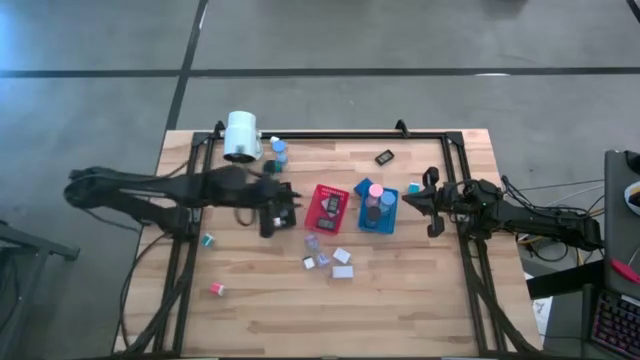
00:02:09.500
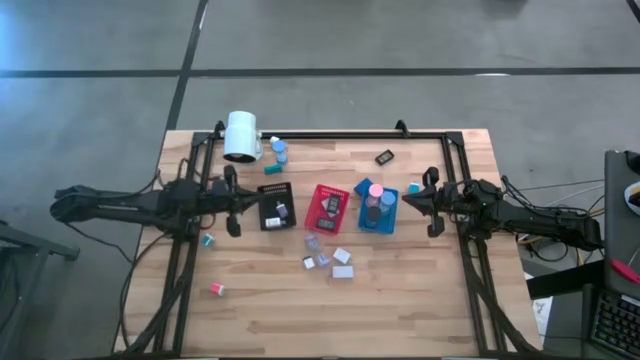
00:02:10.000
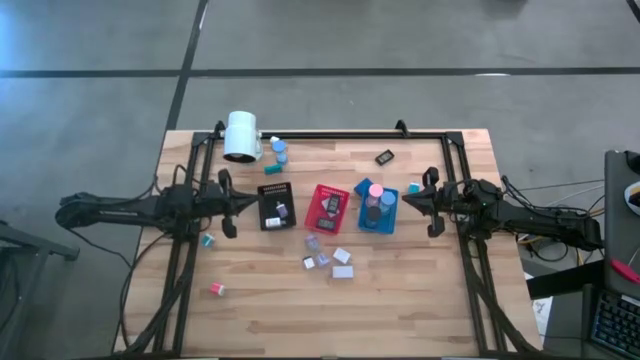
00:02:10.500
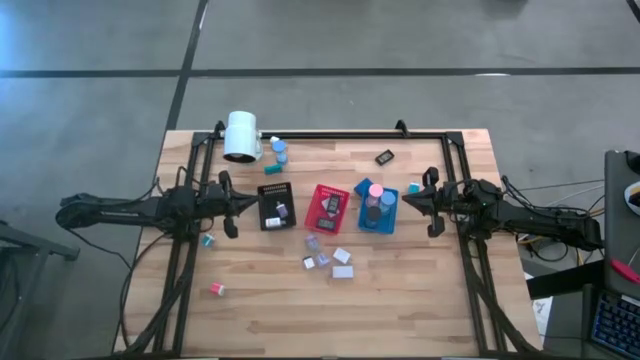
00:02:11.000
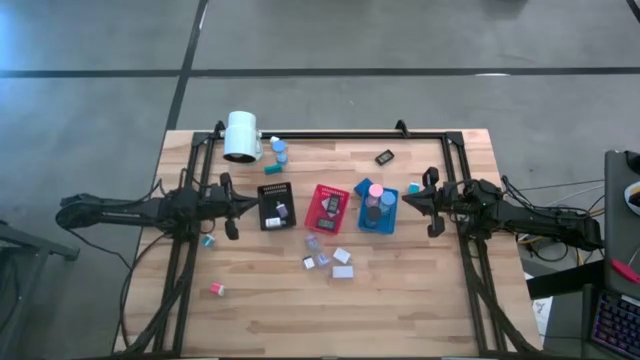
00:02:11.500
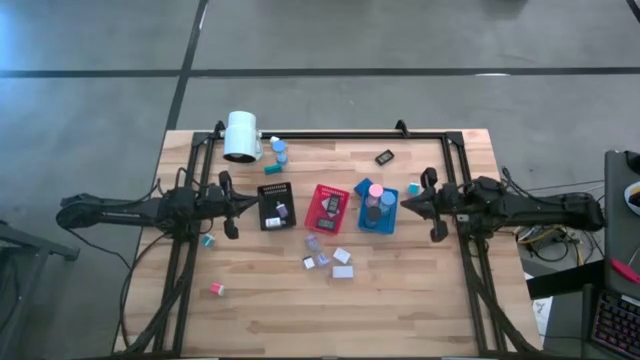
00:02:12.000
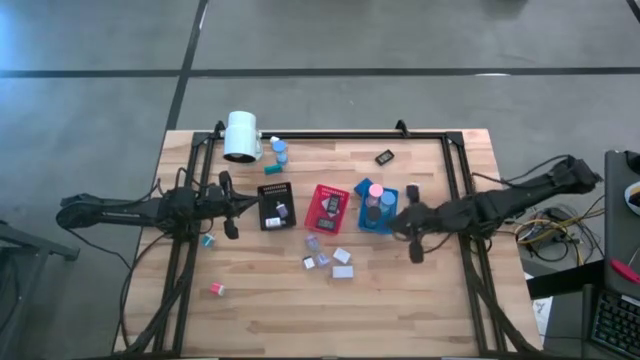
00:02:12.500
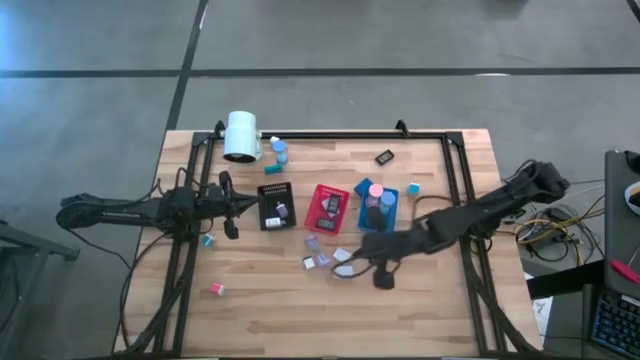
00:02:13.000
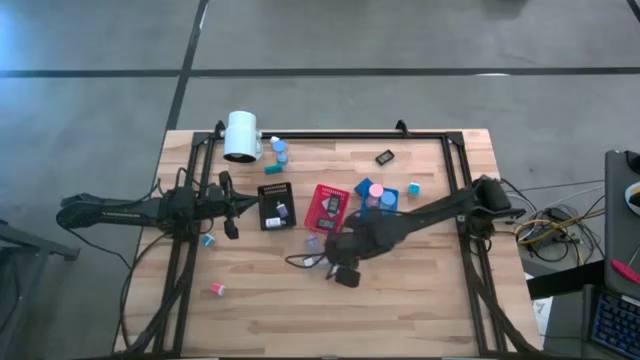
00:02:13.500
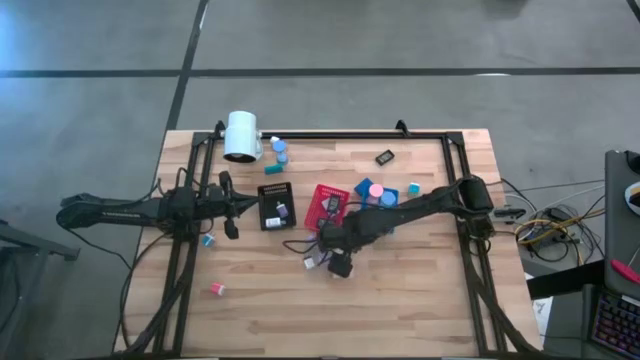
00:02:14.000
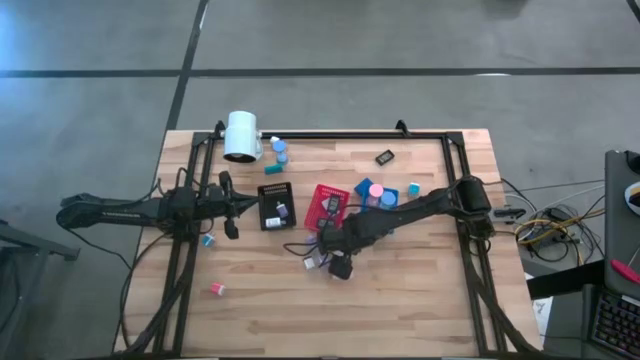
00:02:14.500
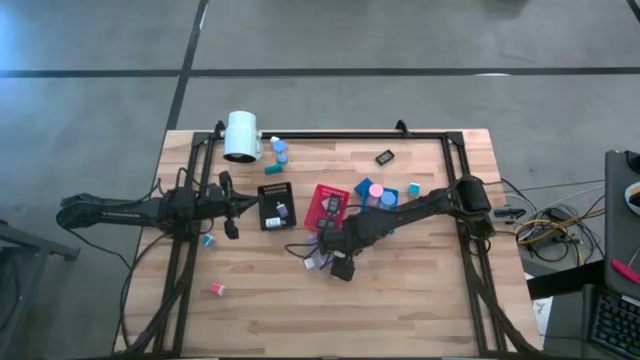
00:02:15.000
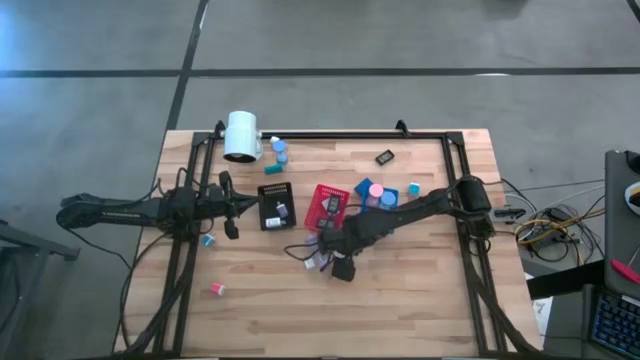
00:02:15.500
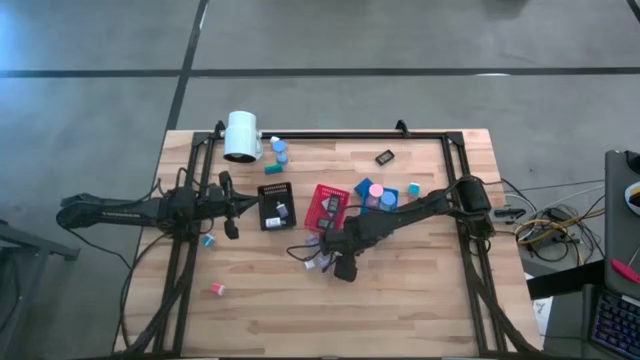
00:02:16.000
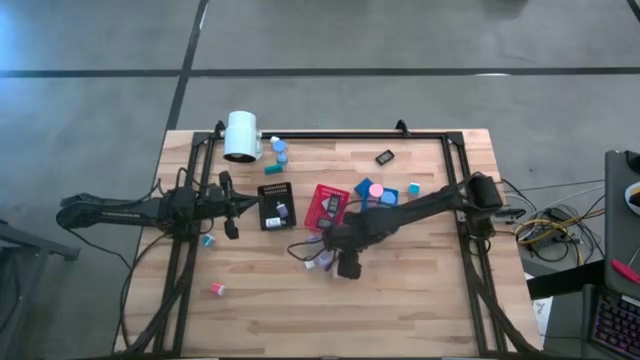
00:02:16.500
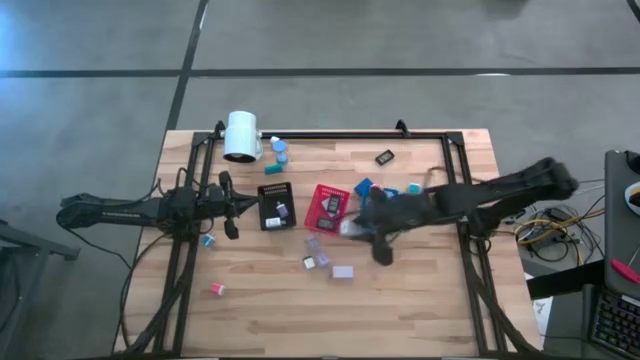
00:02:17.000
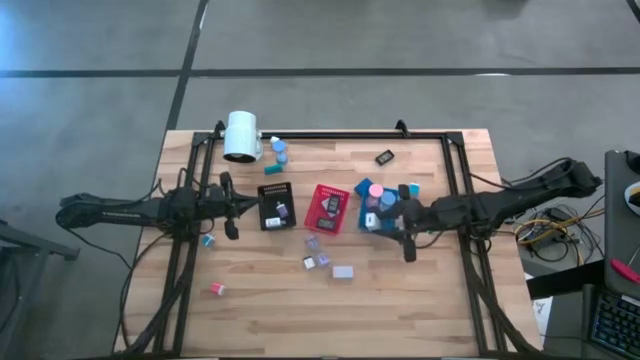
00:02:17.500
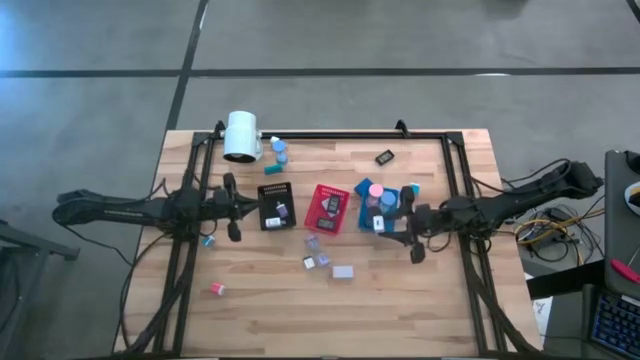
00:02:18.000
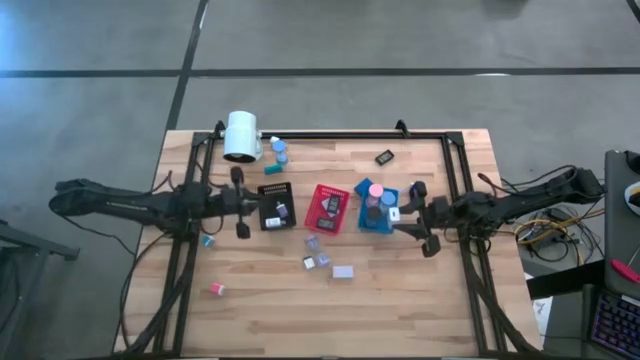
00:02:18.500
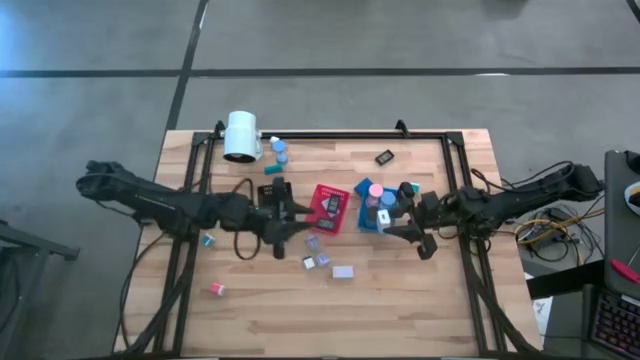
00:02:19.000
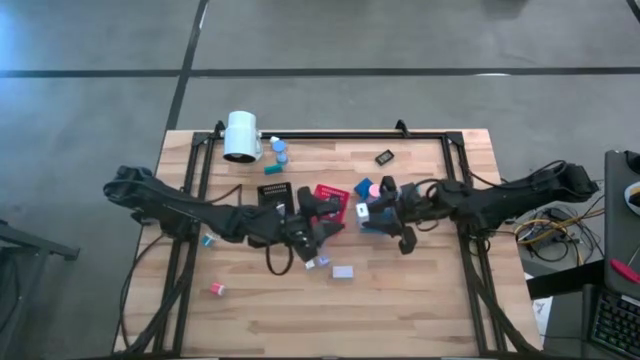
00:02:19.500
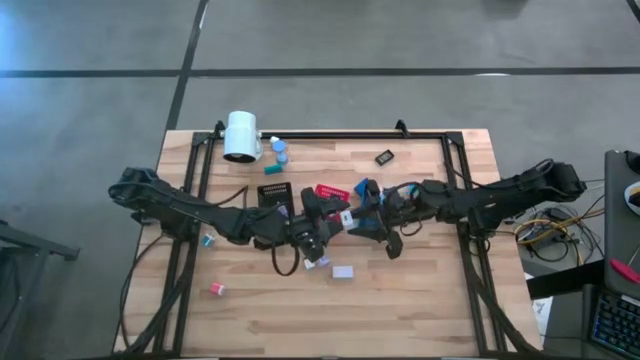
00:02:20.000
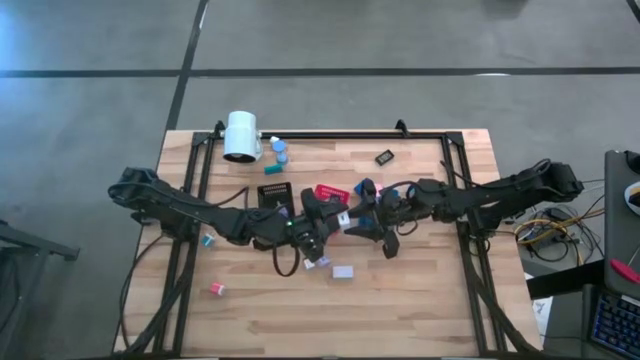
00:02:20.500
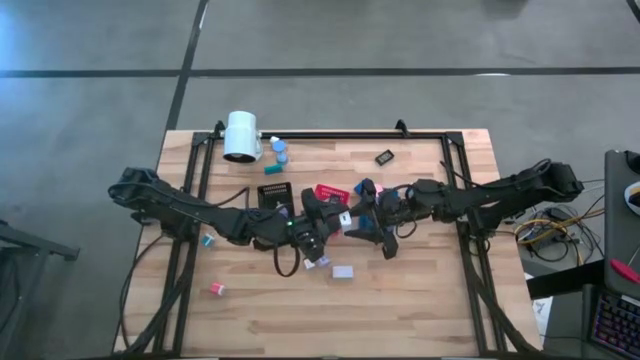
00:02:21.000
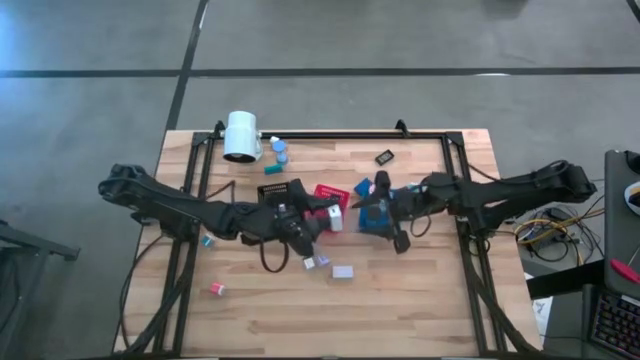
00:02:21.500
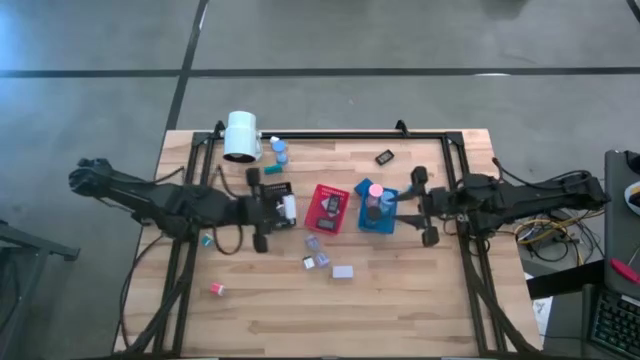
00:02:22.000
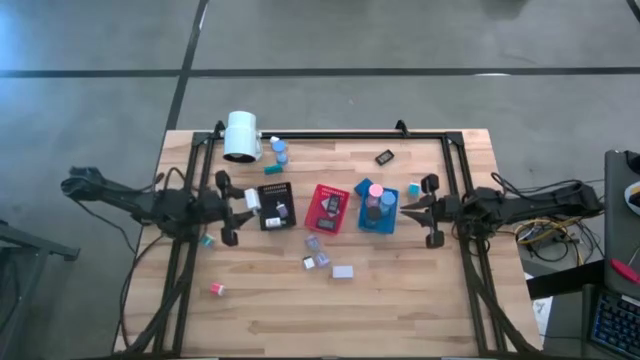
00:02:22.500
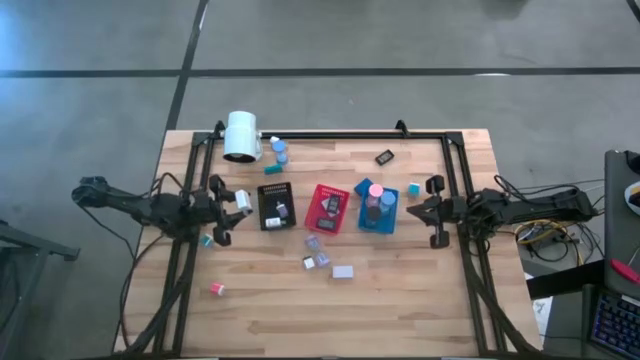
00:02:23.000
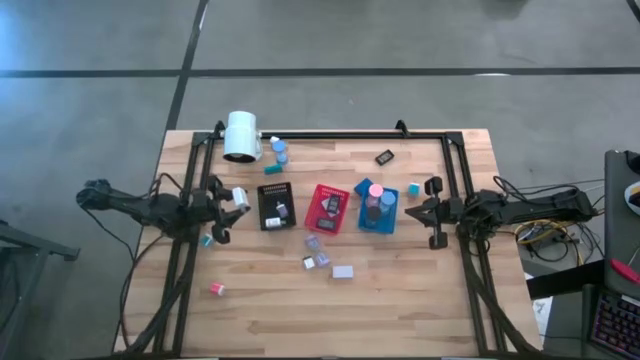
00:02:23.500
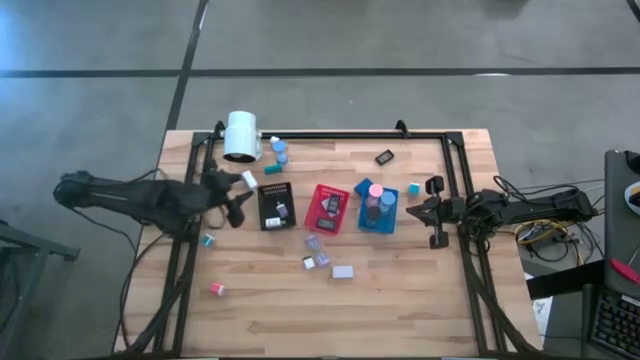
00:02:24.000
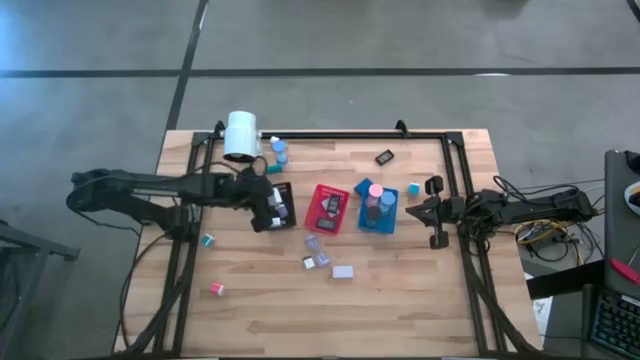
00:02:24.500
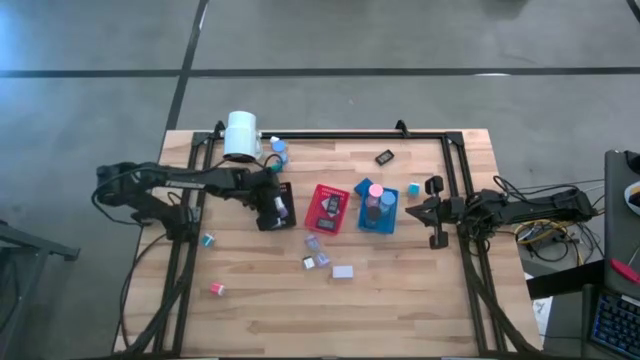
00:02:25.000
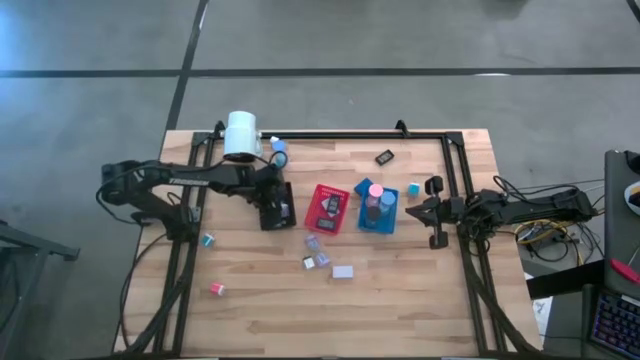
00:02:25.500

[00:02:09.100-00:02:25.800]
Task: Pick & Place Office items
Put the white charger adapter into the black bin

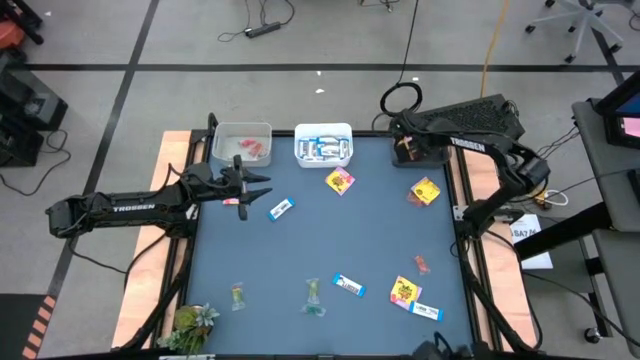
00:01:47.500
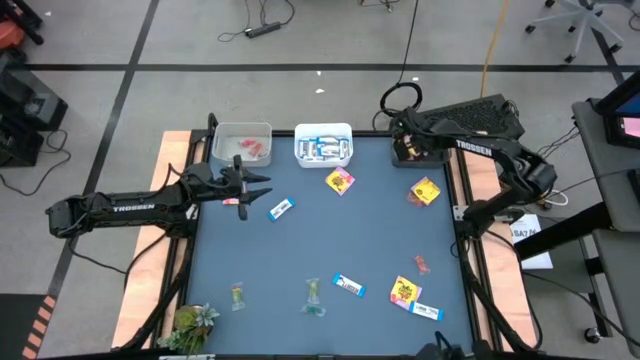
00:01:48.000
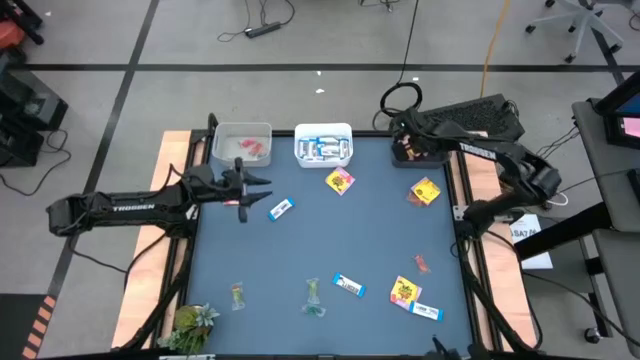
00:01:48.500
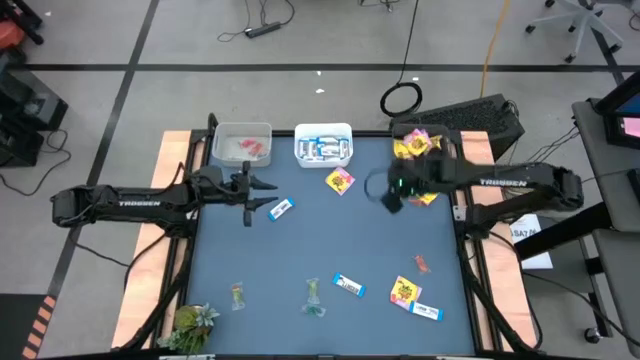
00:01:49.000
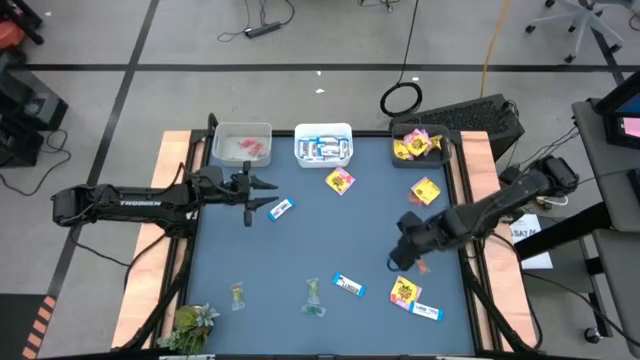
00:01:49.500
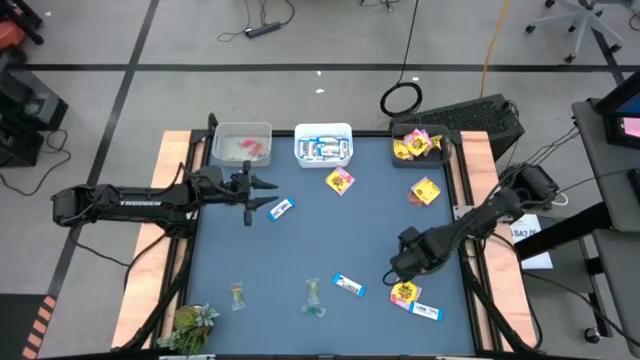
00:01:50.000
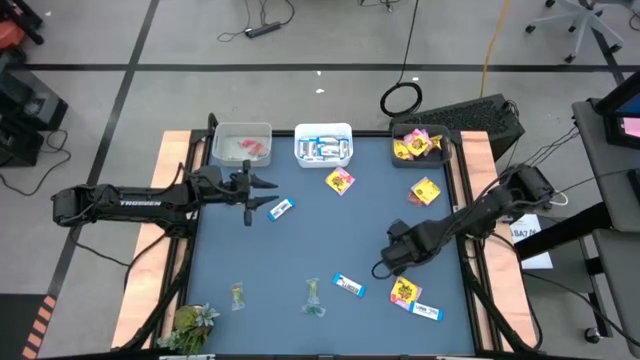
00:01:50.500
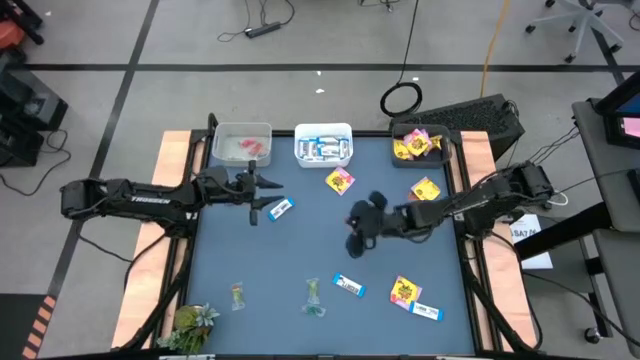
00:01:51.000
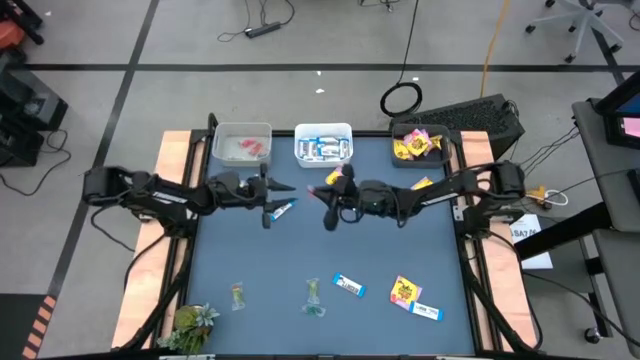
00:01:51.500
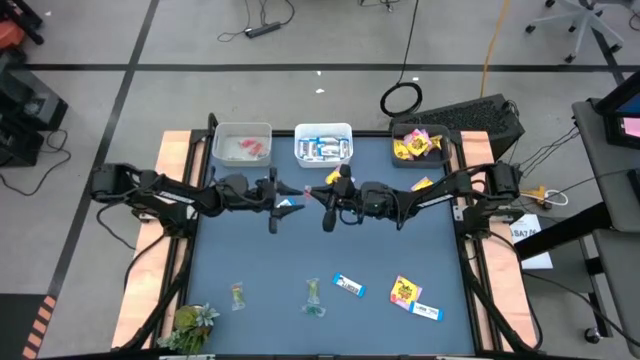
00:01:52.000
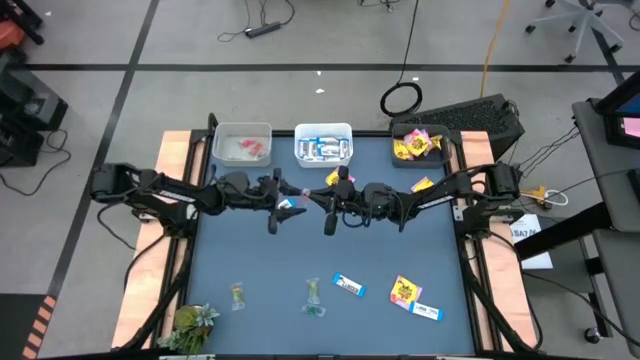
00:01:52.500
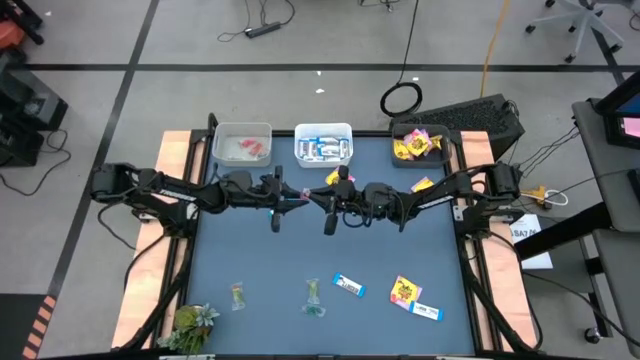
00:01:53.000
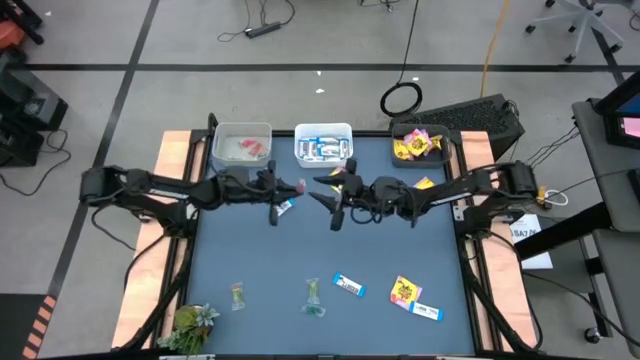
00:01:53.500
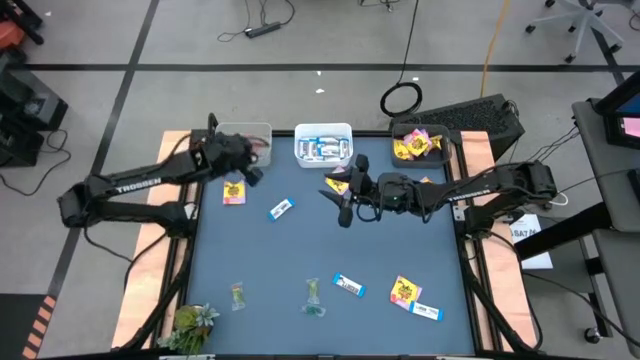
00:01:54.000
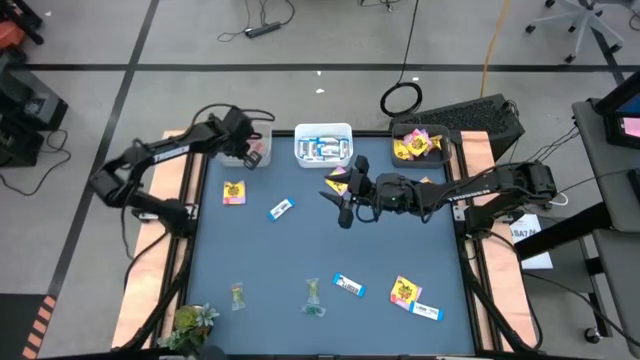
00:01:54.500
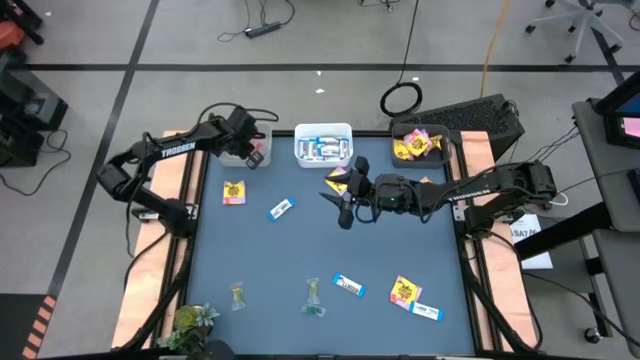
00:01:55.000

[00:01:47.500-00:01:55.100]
Task: Sort candy
Put the orange gummy into the gray bin
